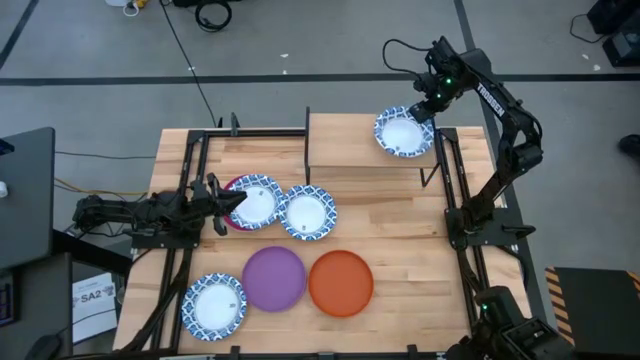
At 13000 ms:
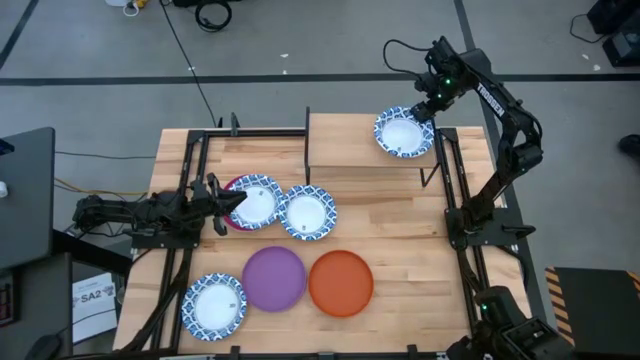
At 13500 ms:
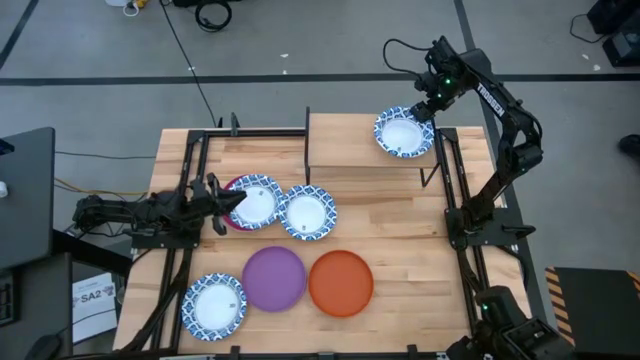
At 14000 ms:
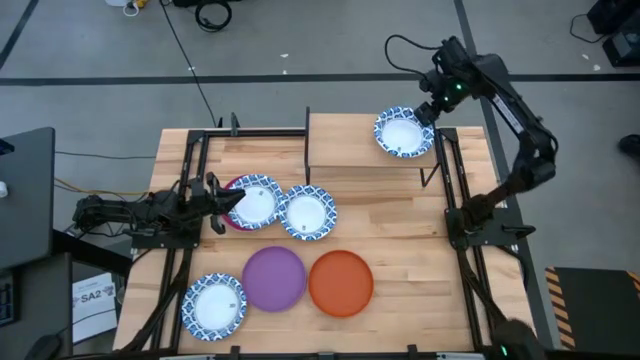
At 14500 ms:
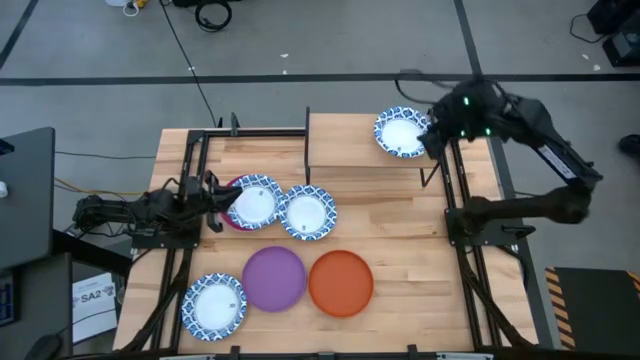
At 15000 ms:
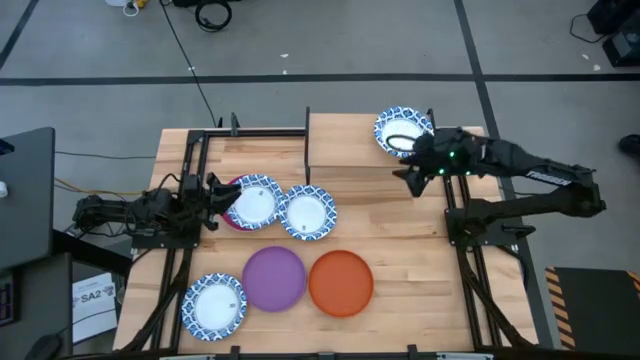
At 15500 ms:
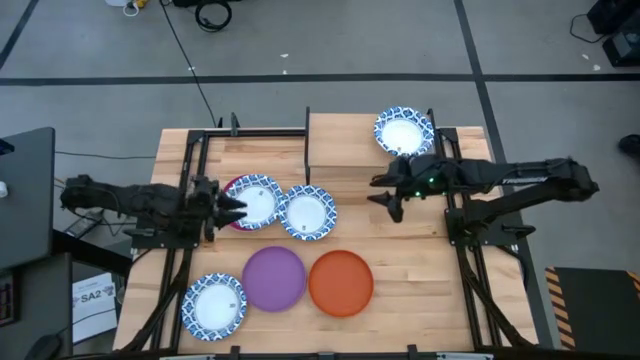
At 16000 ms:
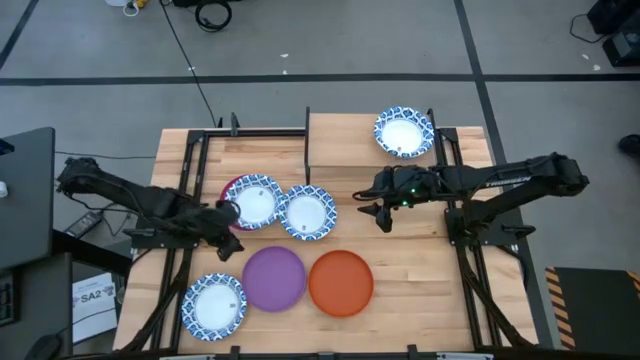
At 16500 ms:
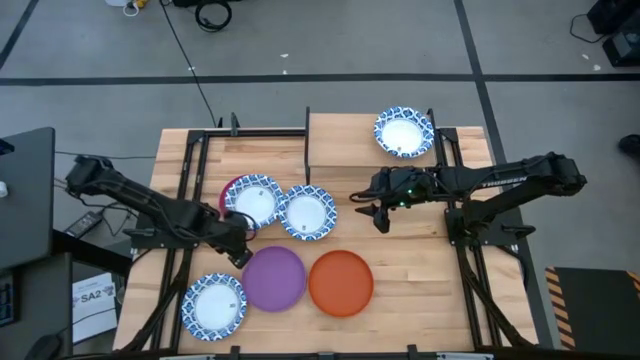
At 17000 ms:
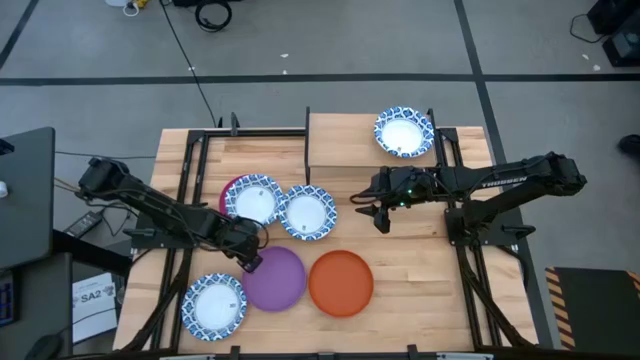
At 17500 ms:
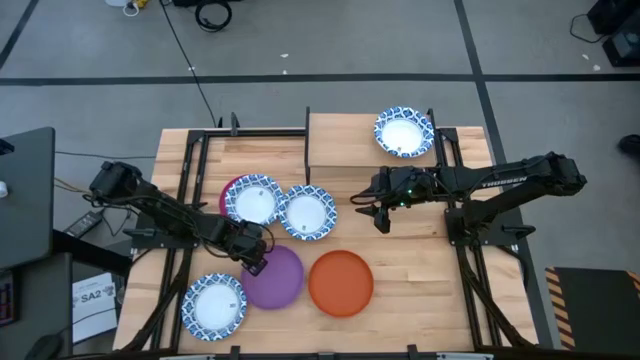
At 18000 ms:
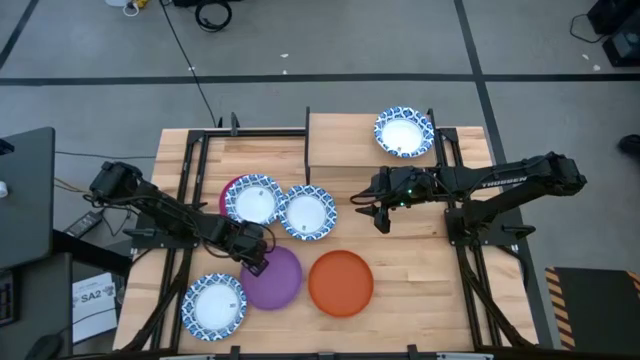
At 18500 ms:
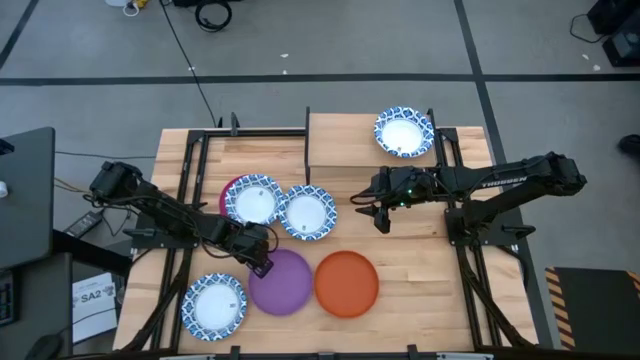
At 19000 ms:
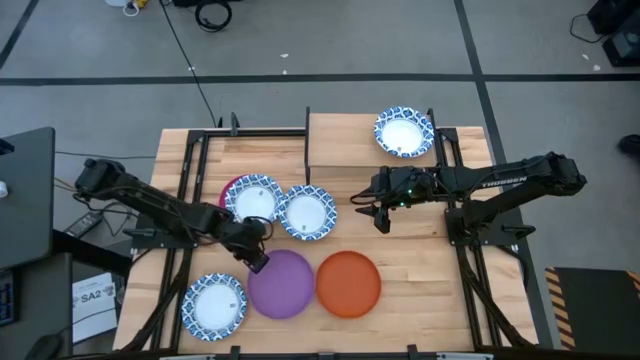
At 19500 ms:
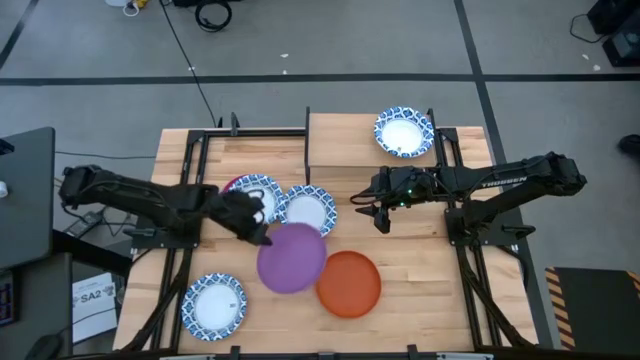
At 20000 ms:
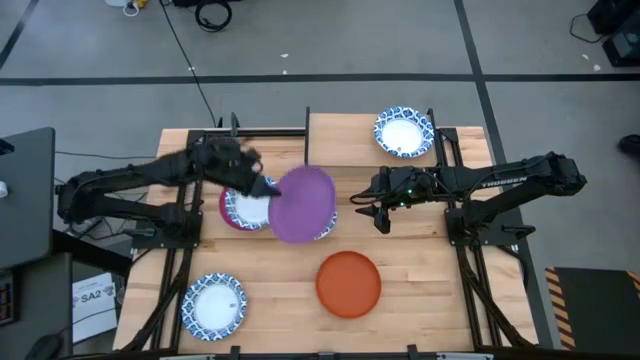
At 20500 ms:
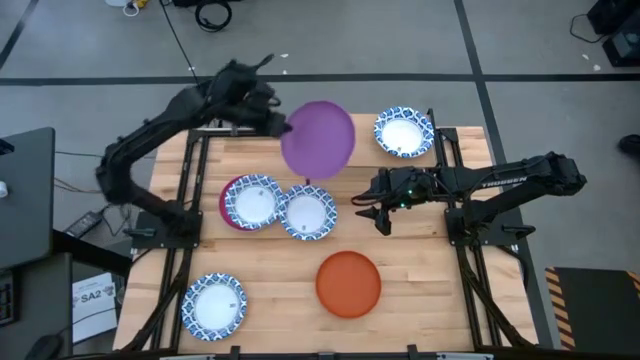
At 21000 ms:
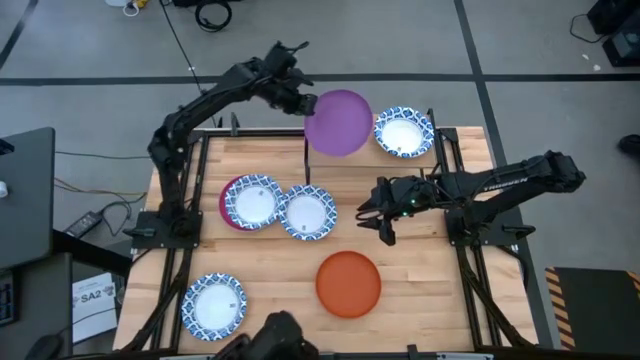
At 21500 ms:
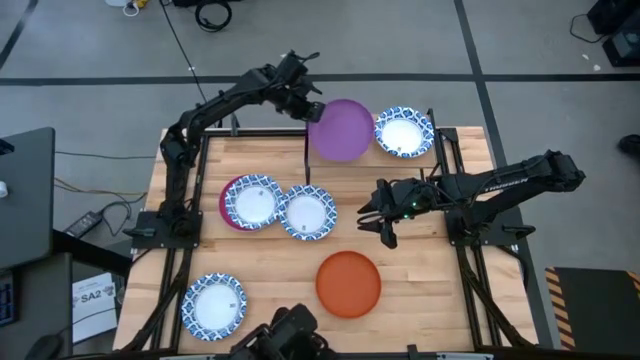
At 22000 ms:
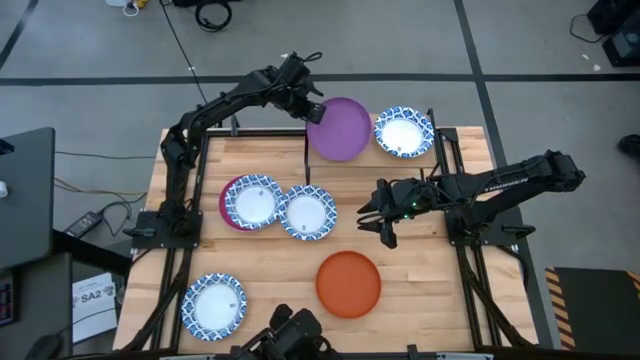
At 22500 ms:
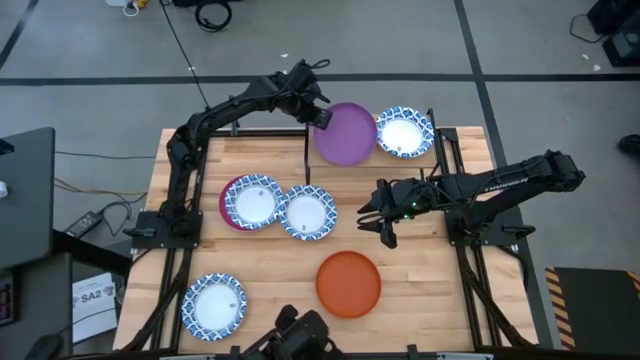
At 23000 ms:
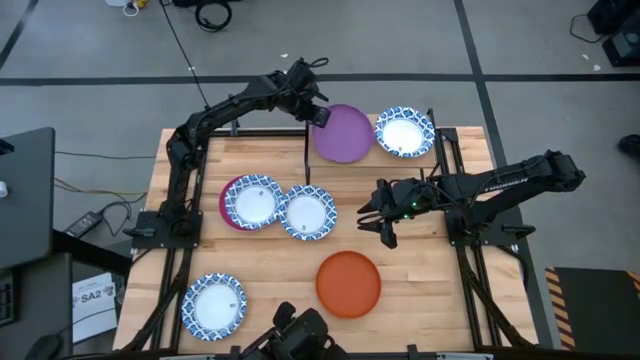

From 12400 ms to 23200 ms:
Task: Place and stack plates onto a shelf
Put the violet plate on the shelf

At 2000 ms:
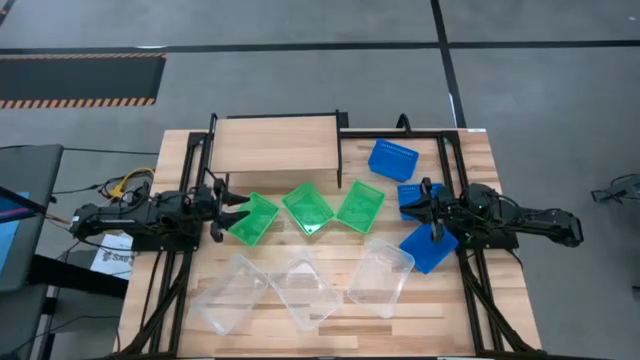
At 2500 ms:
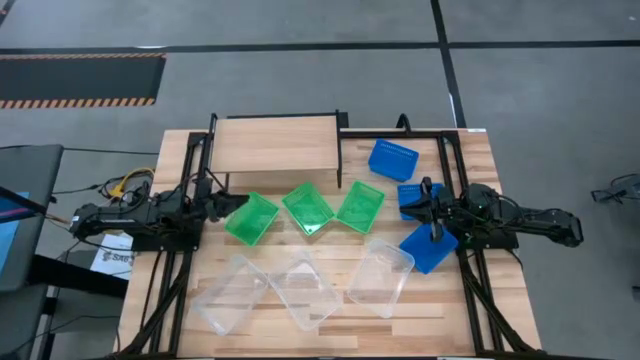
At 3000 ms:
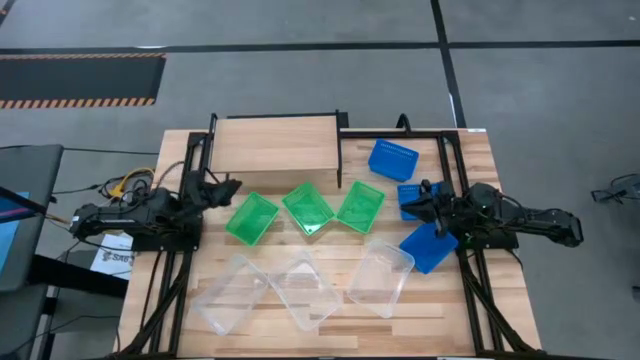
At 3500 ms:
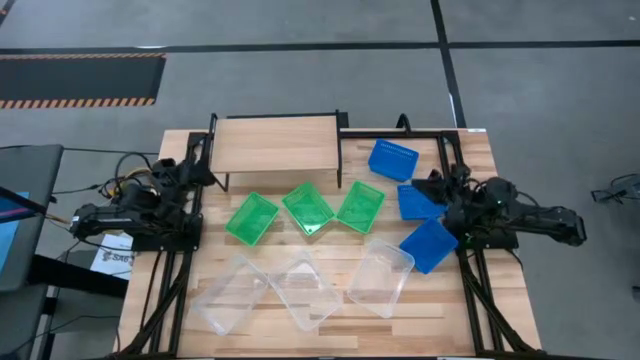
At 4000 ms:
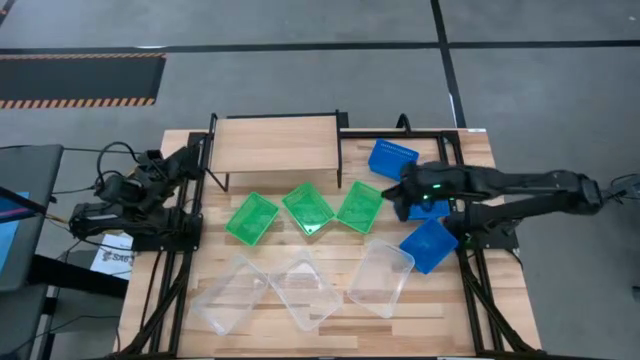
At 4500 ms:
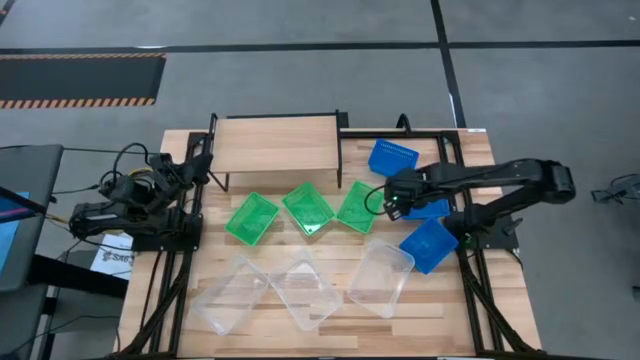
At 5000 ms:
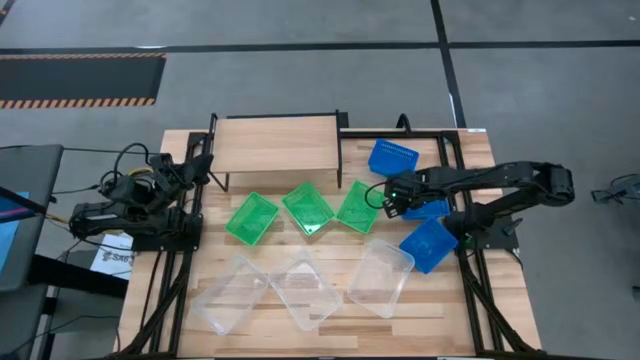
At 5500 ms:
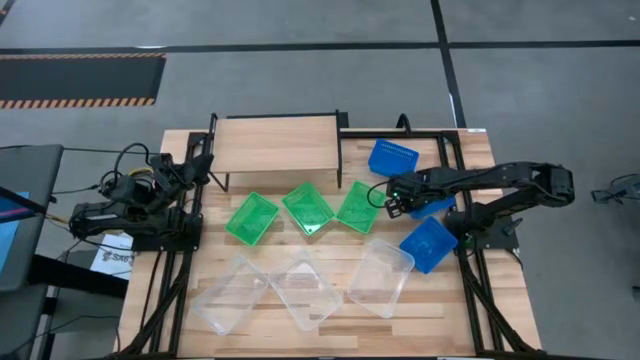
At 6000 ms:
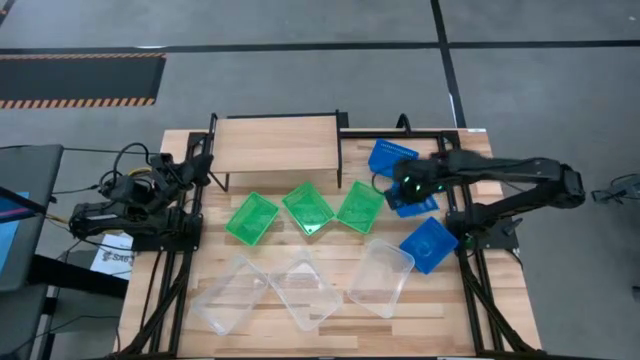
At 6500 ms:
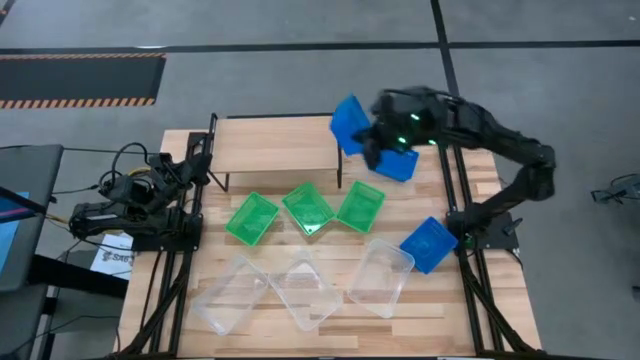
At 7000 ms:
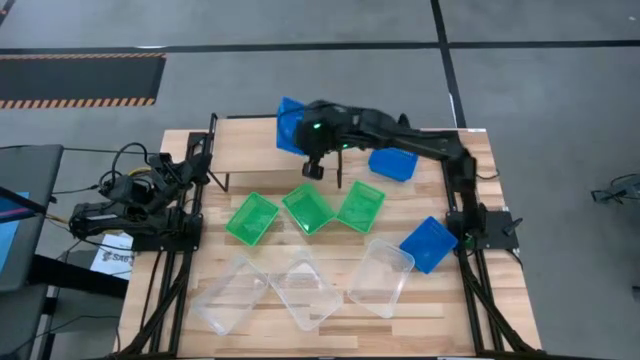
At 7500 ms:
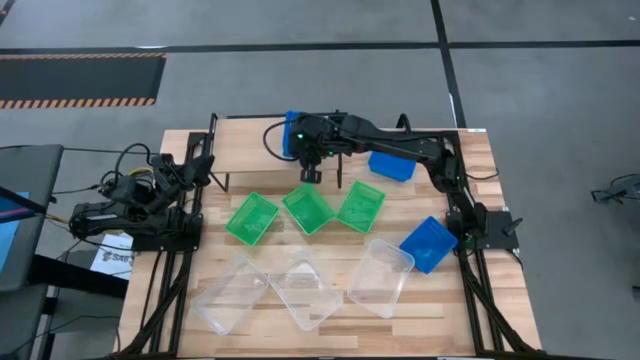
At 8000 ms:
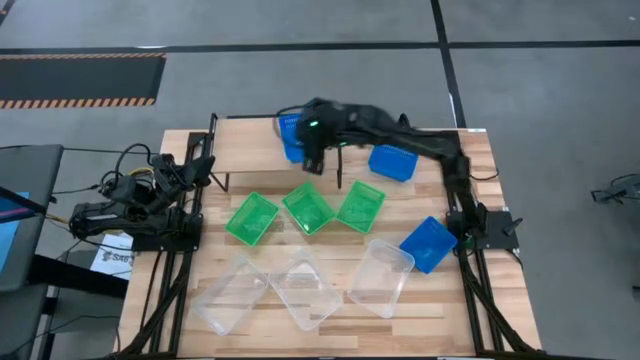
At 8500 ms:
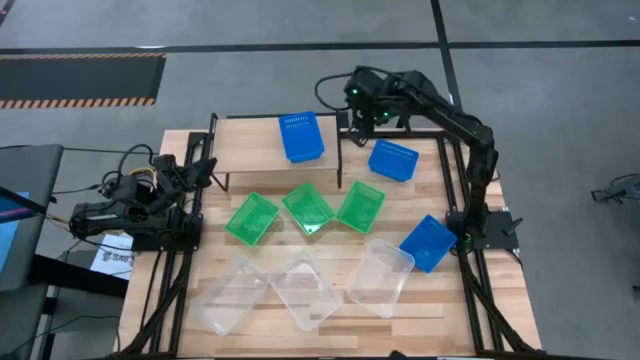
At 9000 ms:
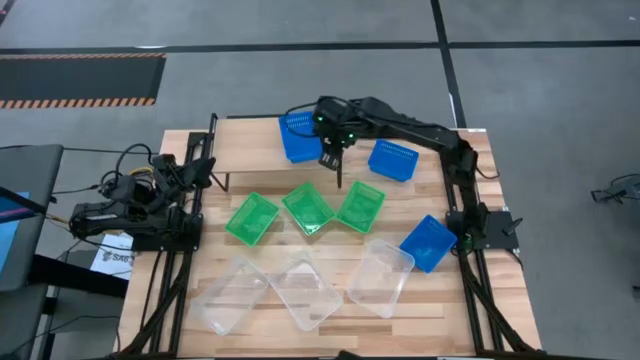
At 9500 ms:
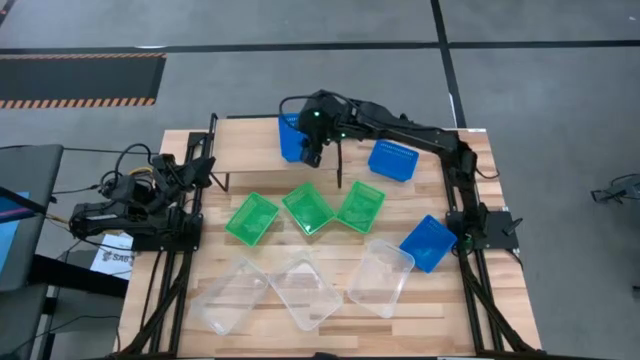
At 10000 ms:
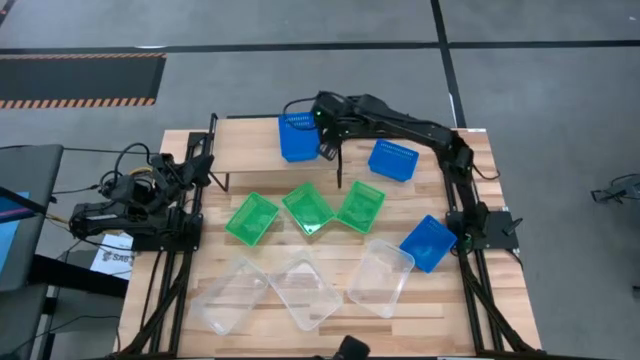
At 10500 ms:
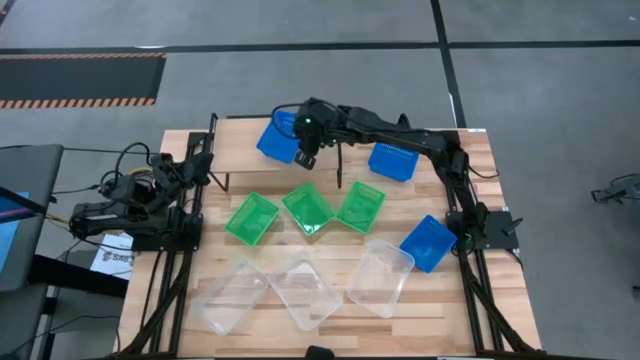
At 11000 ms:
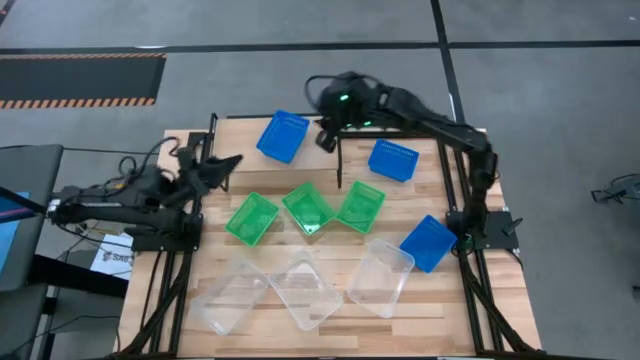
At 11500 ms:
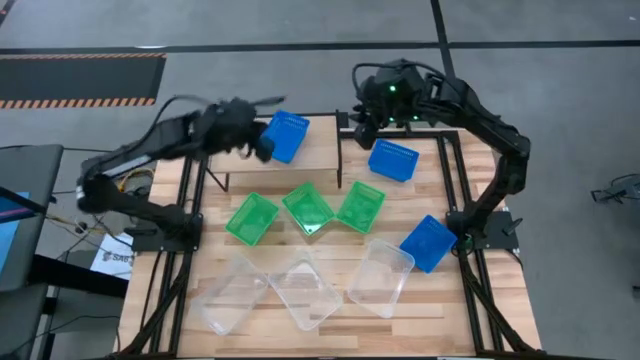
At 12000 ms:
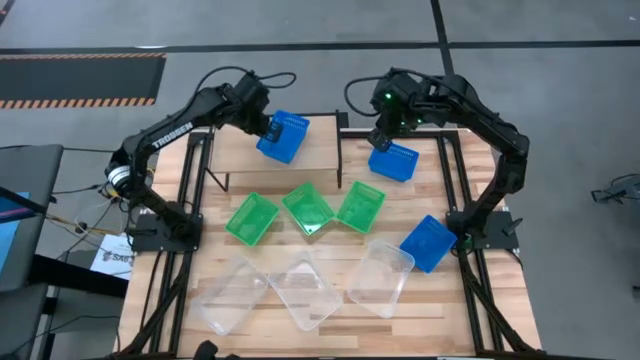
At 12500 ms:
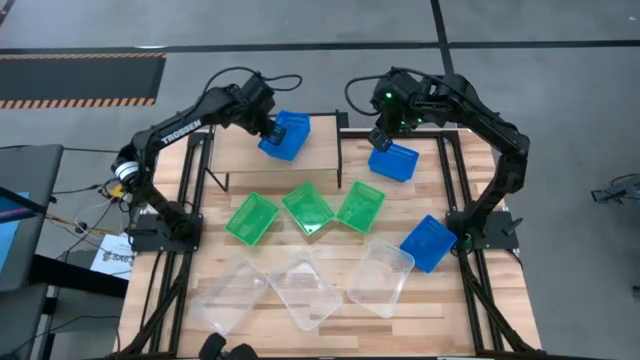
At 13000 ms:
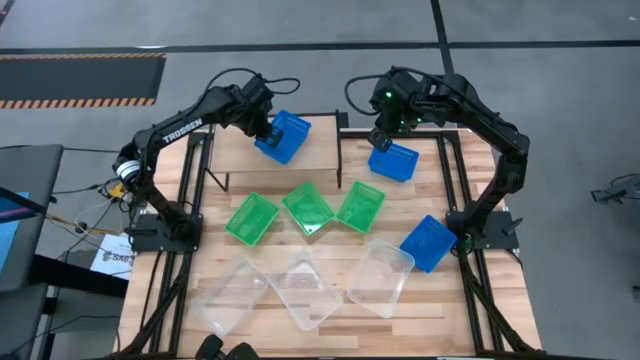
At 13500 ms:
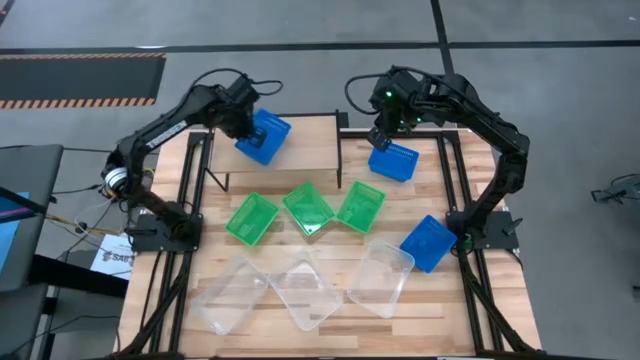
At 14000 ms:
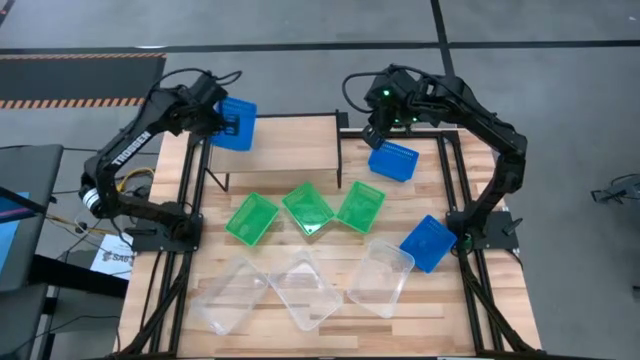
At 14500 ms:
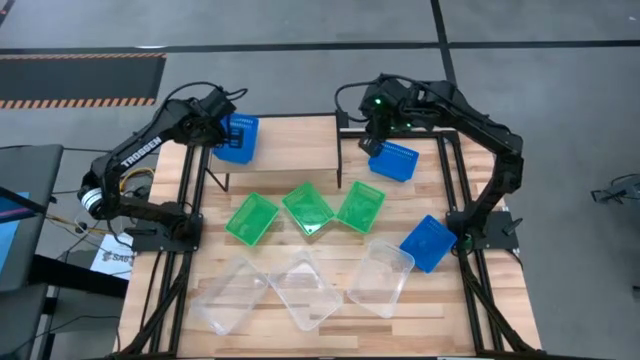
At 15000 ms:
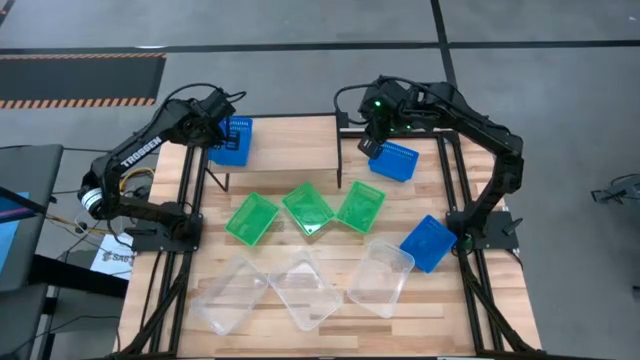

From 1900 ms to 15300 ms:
Task: Stack baskets on shelf by color
Put the middle blue bin on the shelf
